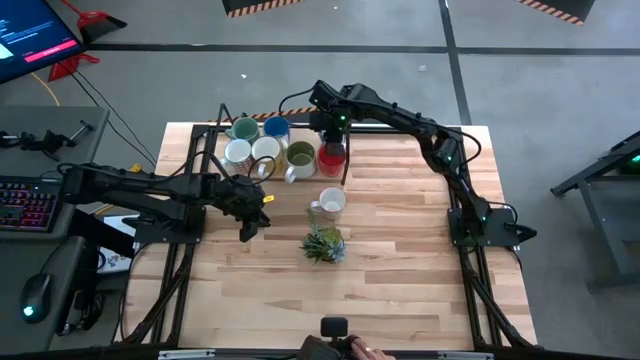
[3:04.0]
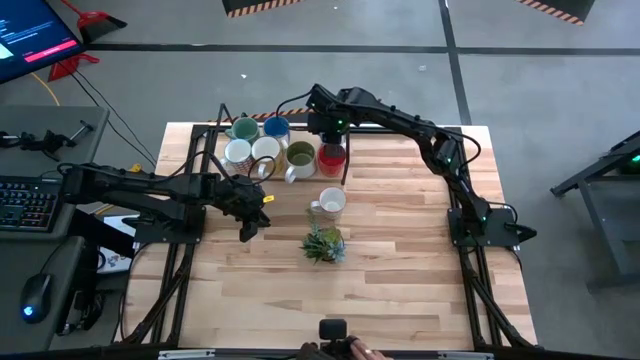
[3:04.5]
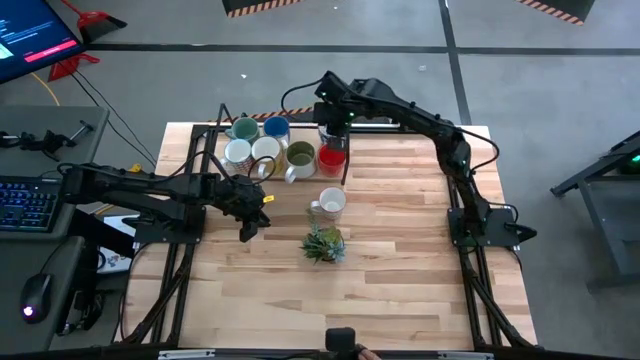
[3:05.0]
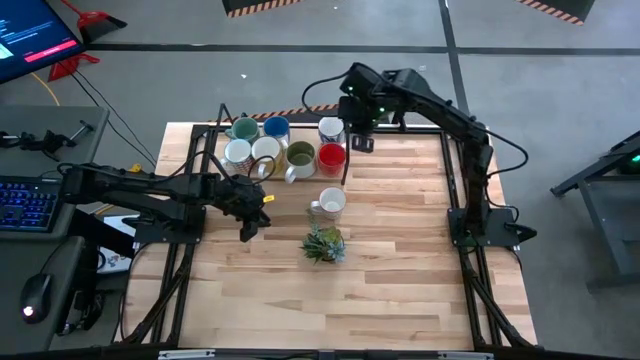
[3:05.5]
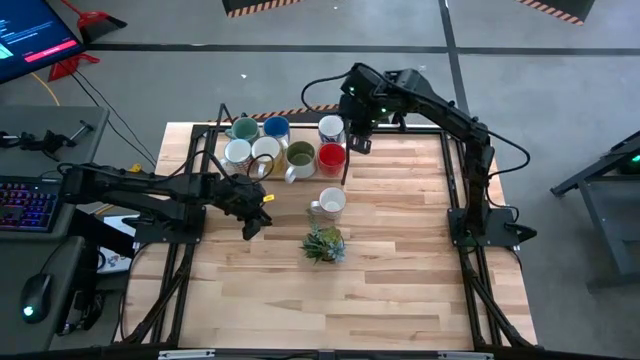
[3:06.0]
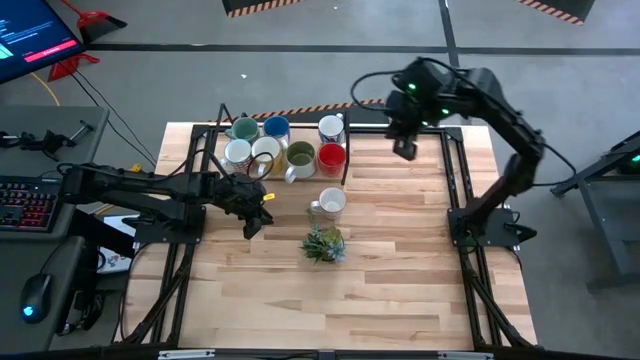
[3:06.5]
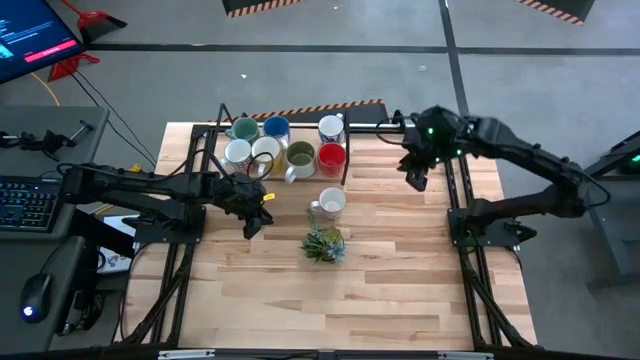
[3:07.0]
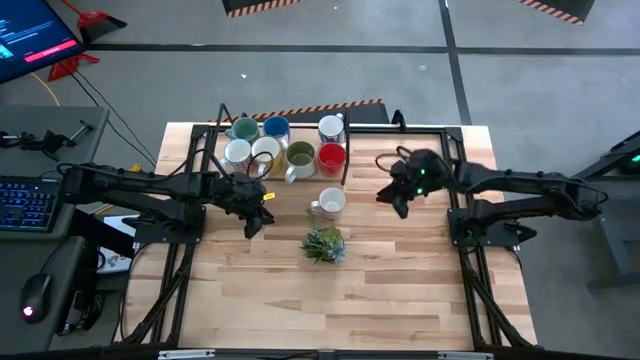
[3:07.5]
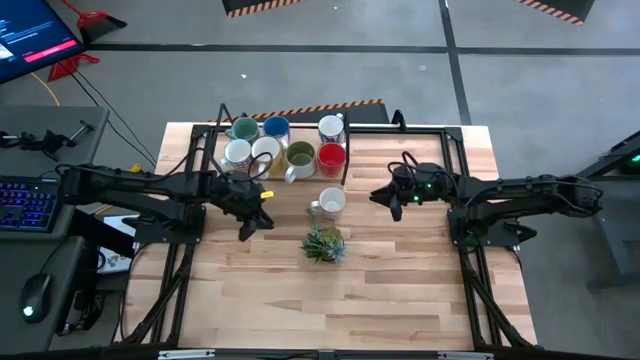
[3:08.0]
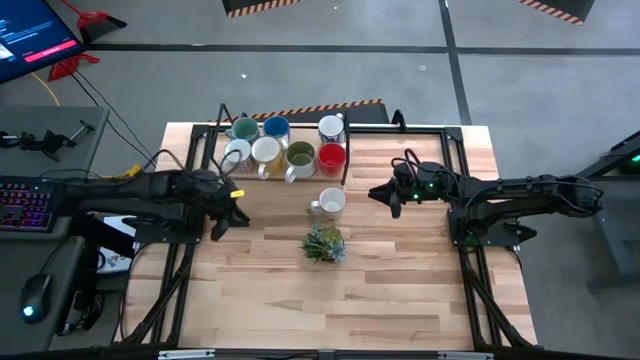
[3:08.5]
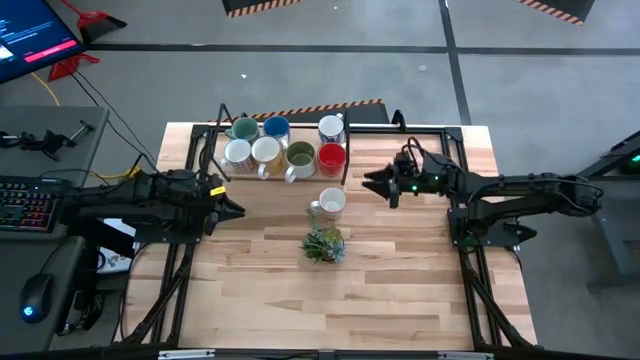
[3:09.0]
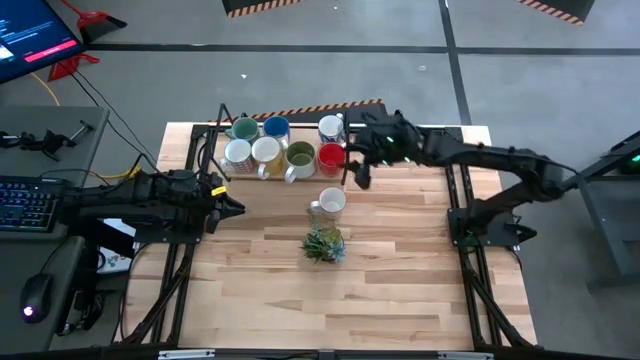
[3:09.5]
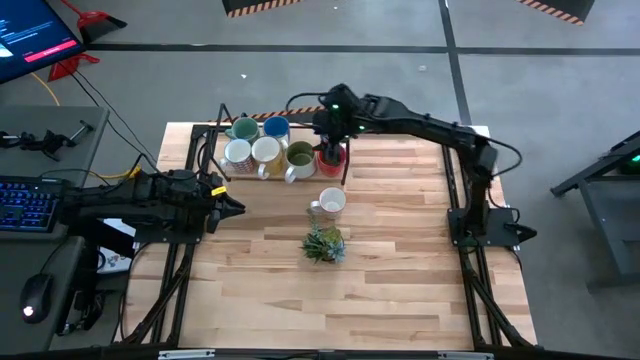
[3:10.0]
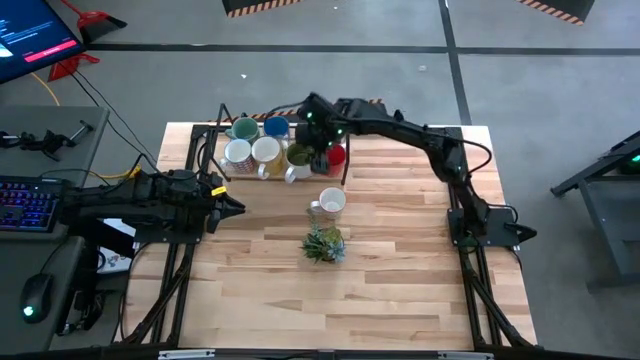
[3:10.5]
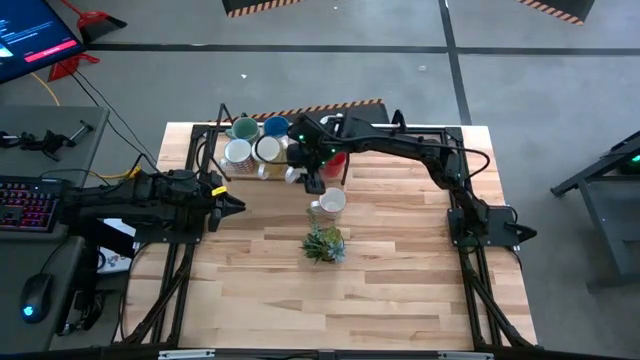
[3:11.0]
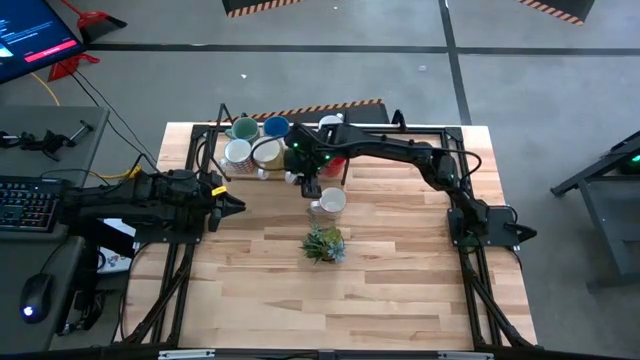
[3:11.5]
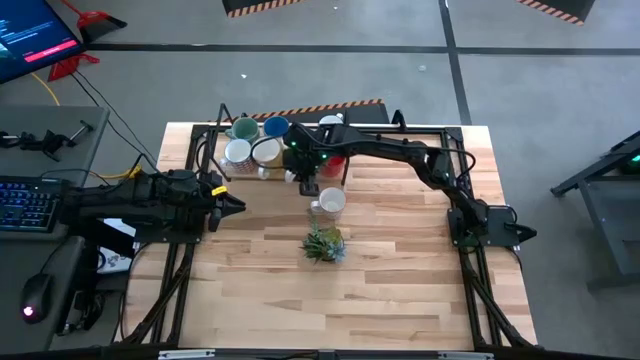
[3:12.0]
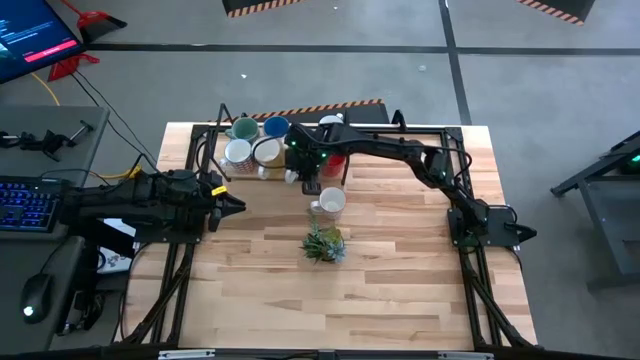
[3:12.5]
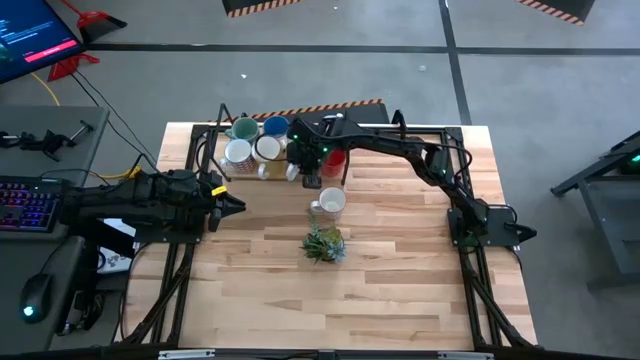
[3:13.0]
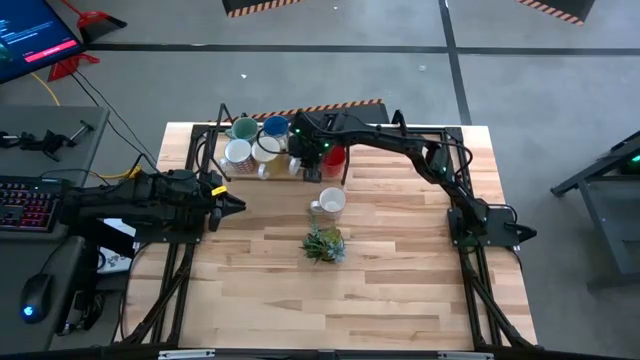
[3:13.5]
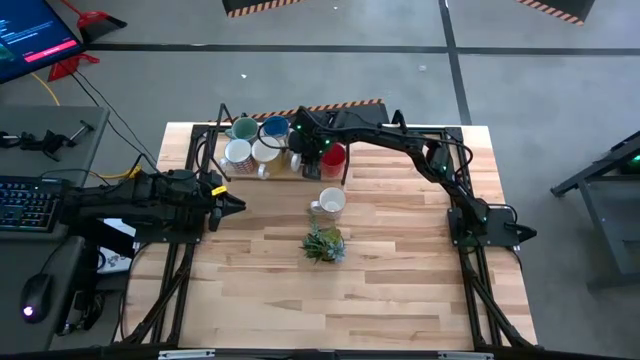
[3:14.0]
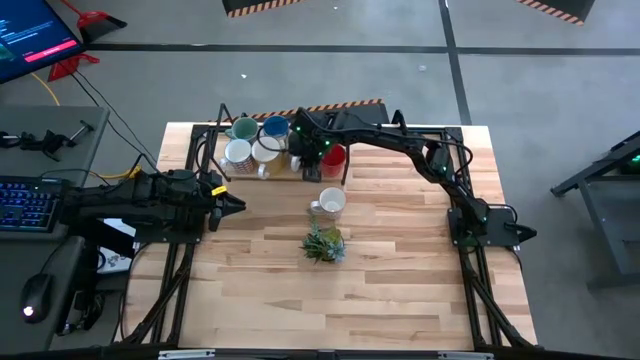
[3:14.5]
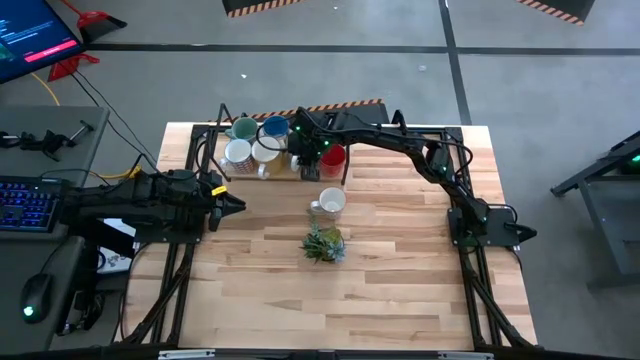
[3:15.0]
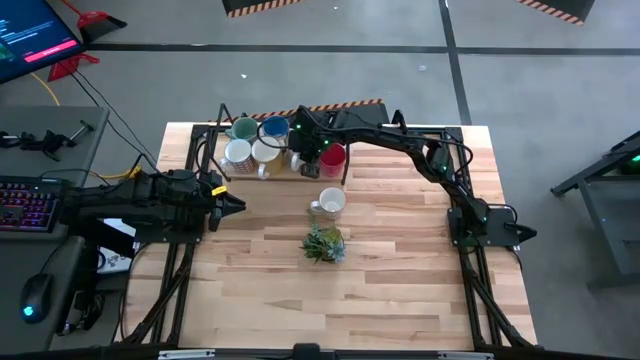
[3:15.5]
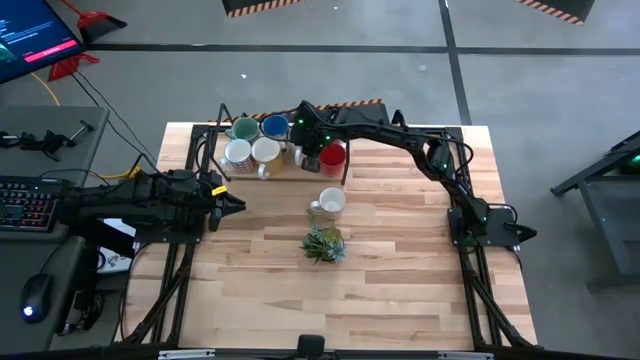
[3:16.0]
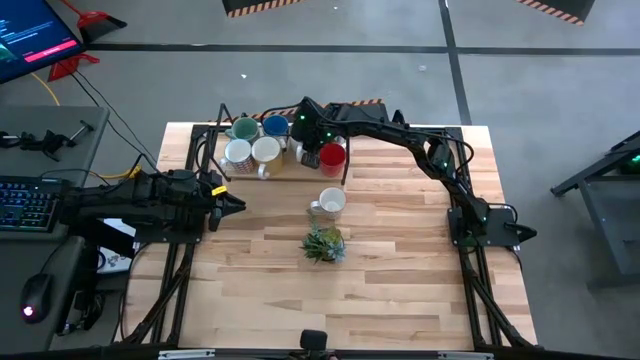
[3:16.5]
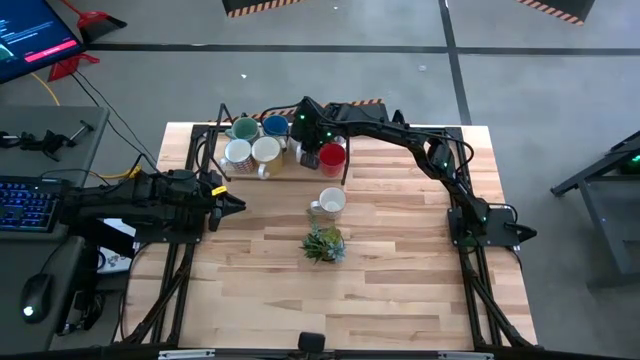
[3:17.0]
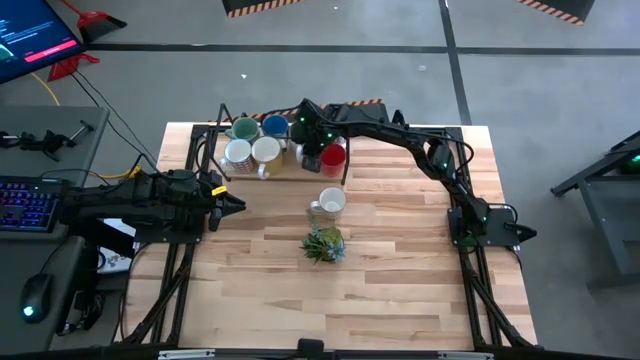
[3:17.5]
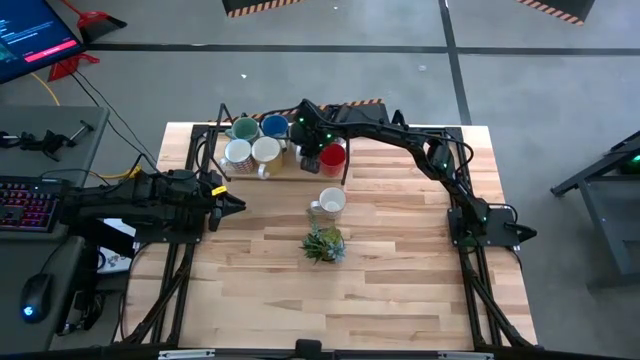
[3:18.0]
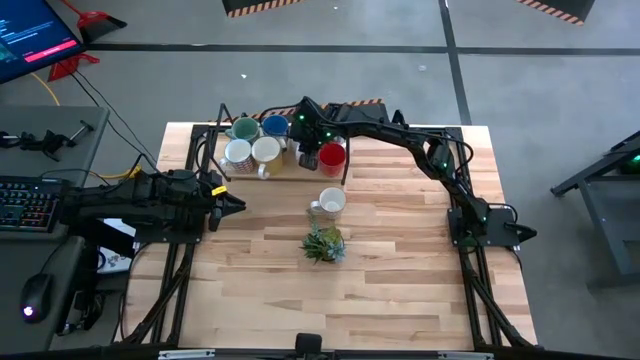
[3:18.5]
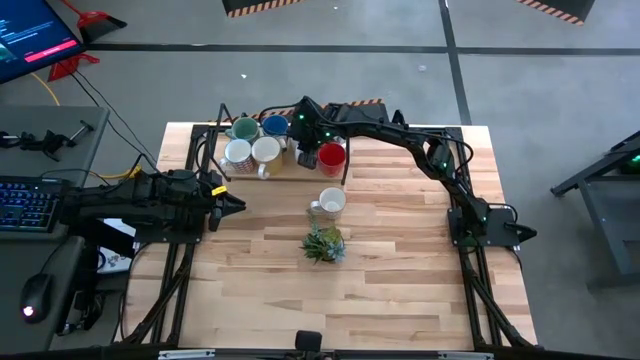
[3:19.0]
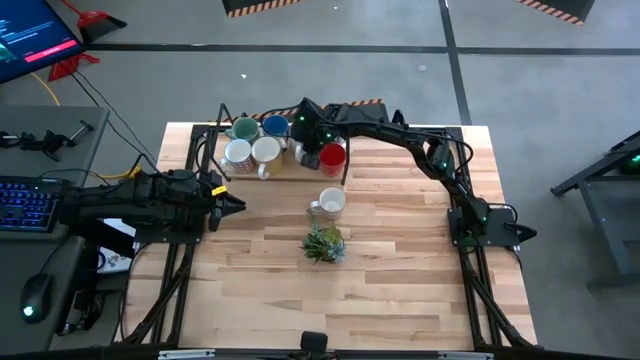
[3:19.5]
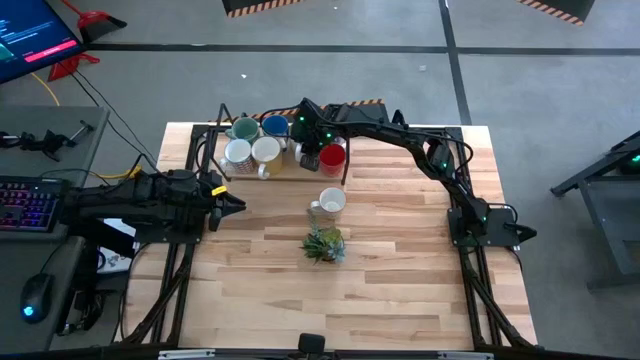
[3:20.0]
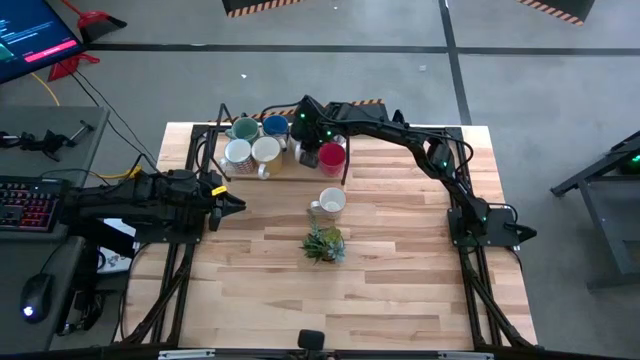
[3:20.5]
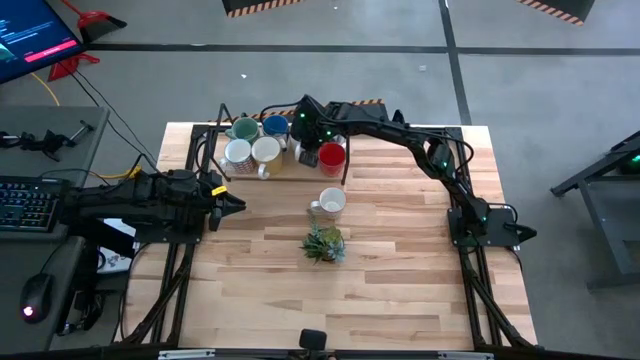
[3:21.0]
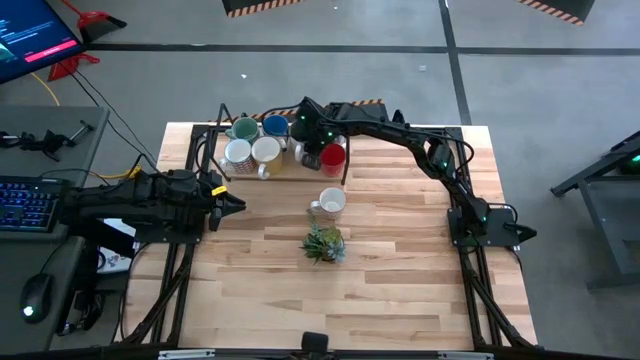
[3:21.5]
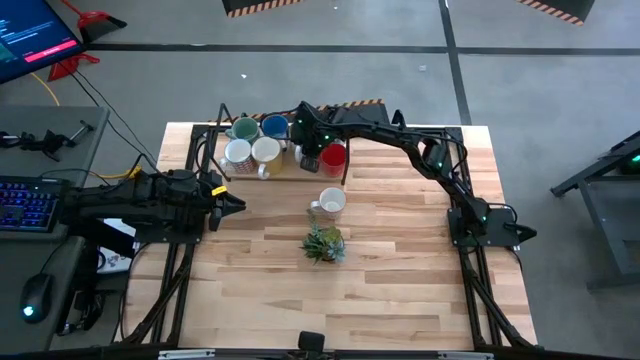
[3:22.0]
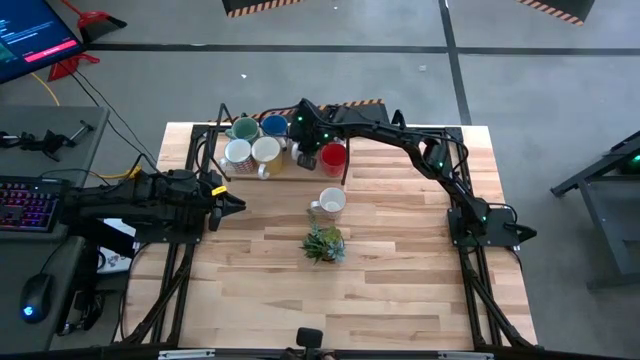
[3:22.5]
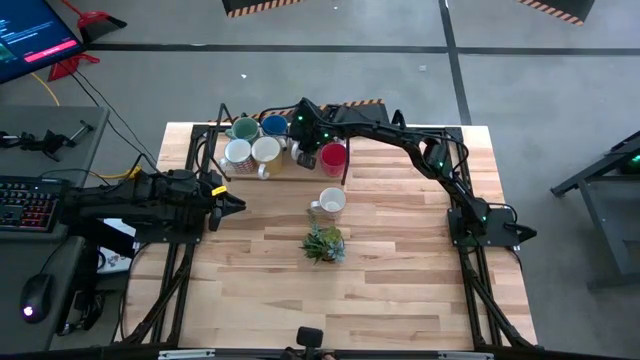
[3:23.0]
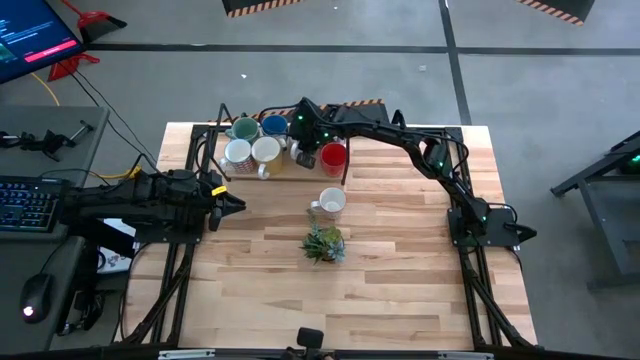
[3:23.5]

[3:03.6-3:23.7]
Task: Place coffee mugs
Adjust the light green mug on the shelf

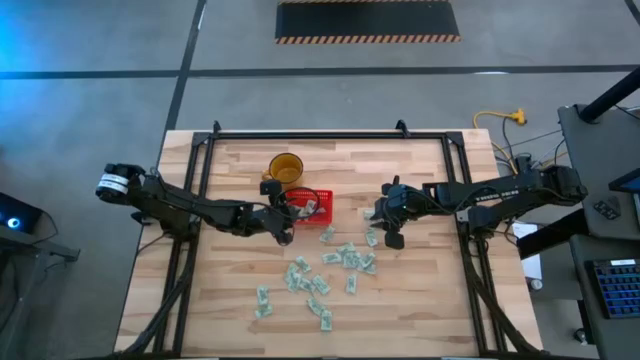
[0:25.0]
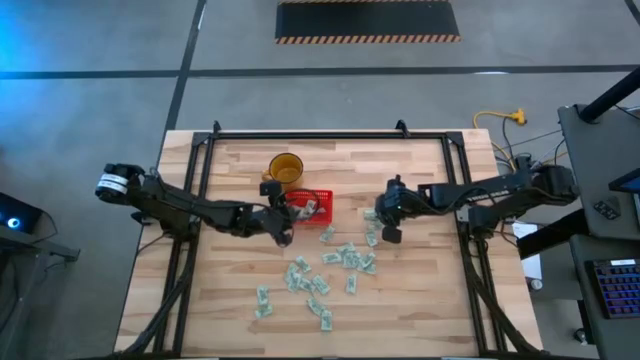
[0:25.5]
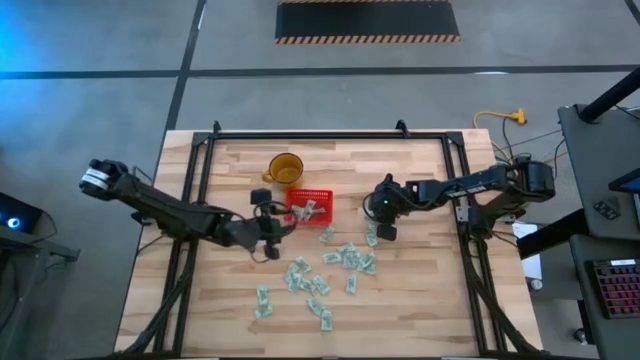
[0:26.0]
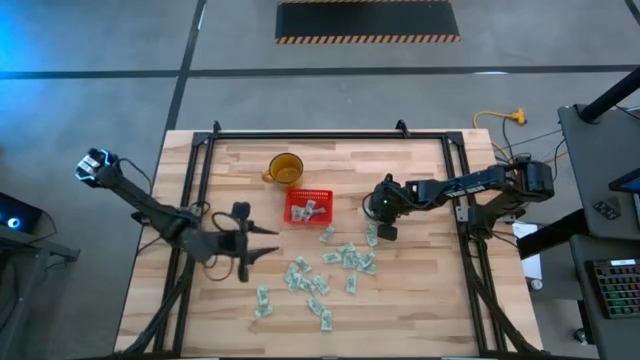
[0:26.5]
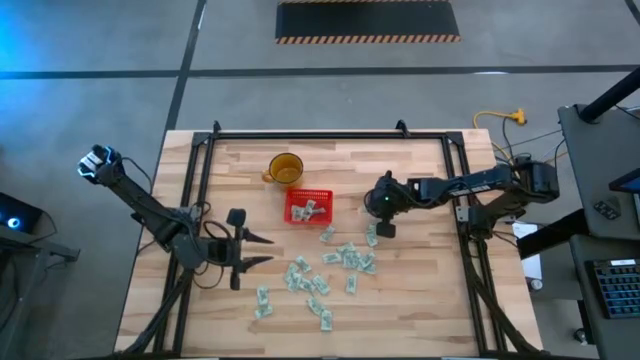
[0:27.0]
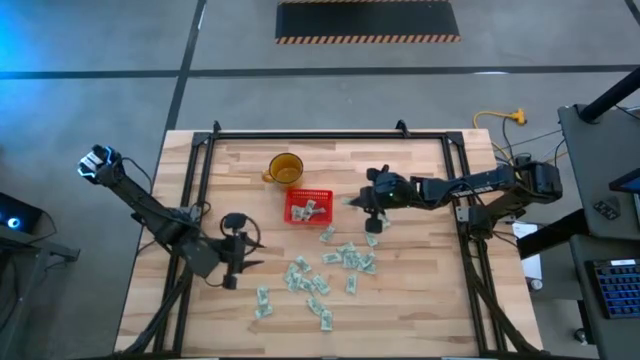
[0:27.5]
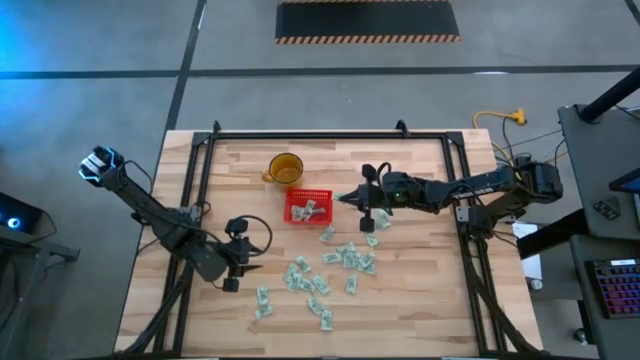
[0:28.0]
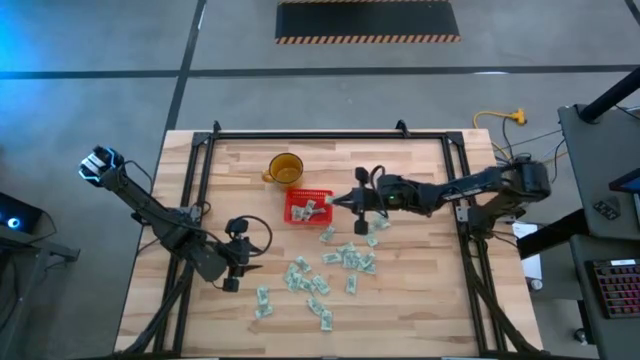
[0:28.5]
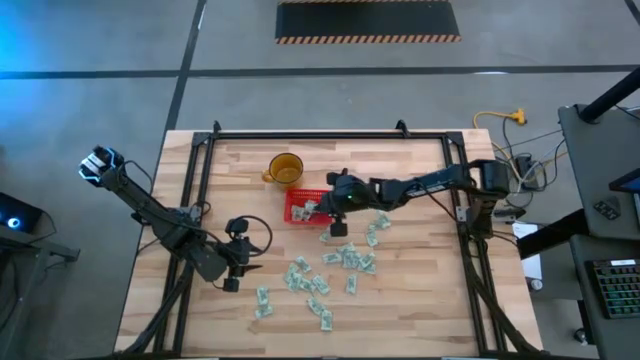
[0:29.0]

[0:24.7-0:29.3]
Task: Pick and place Stevia / Truvia into bins
Put the gray stevia packet into the red basket
